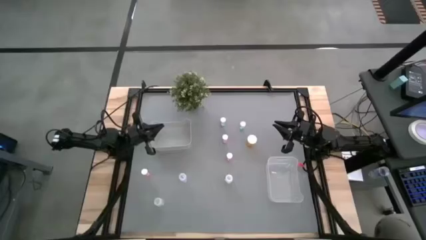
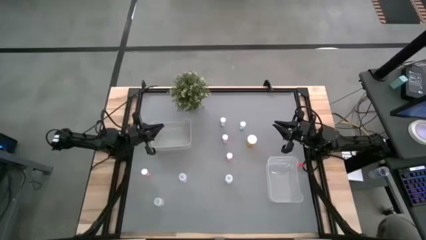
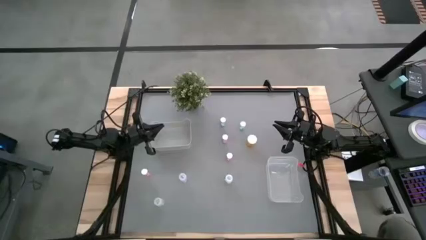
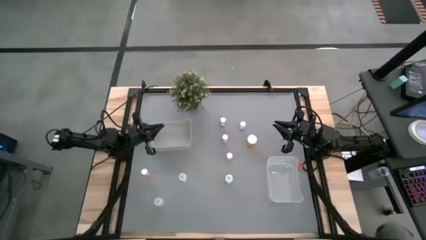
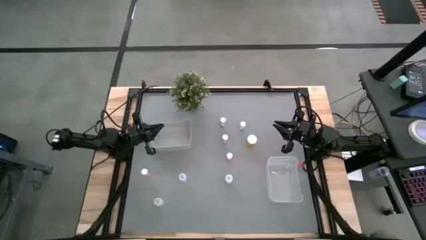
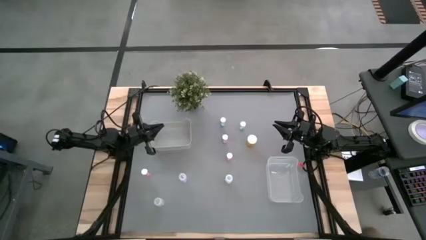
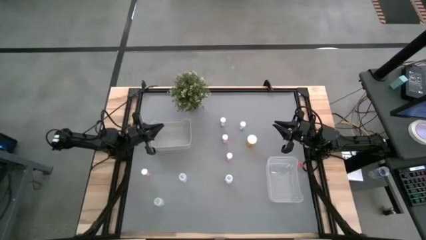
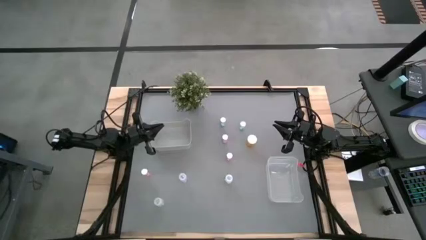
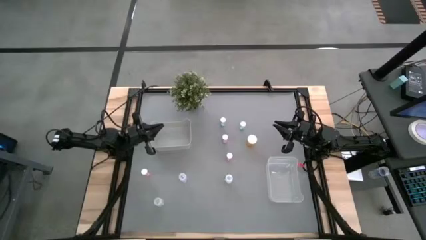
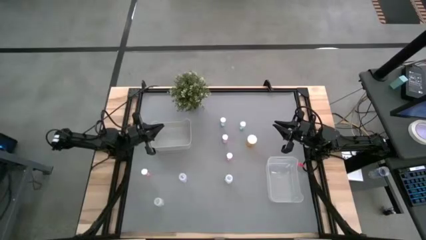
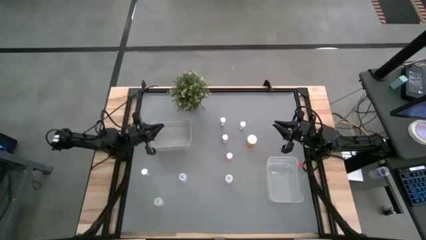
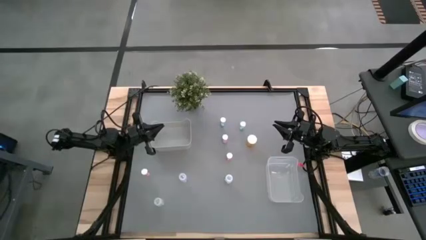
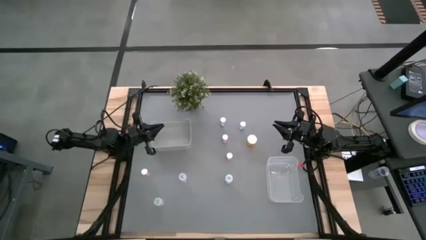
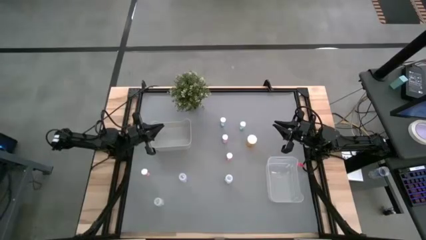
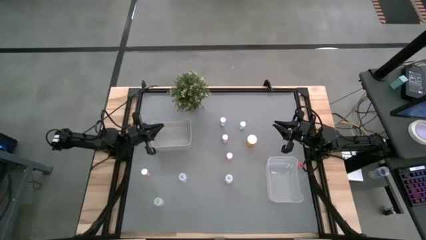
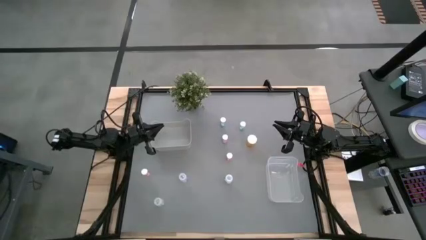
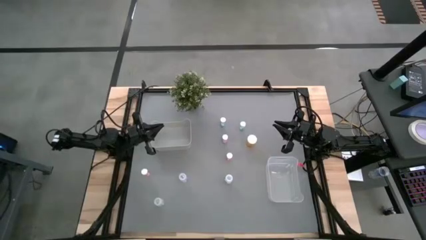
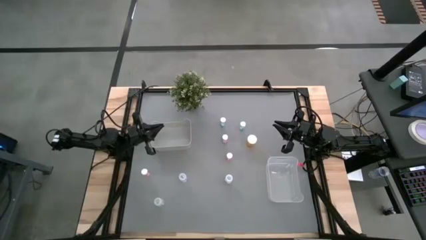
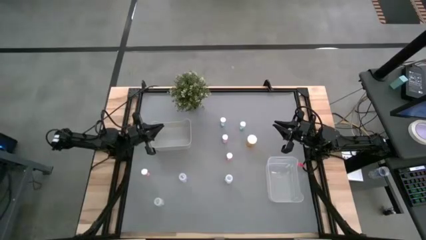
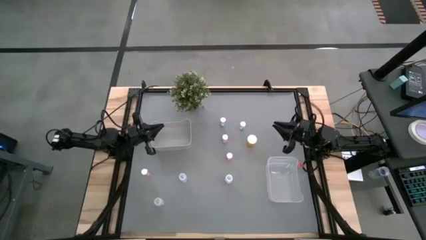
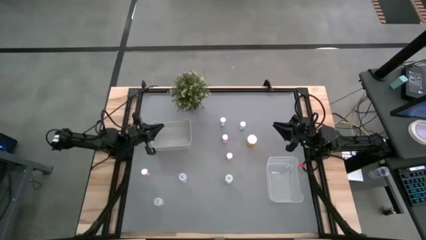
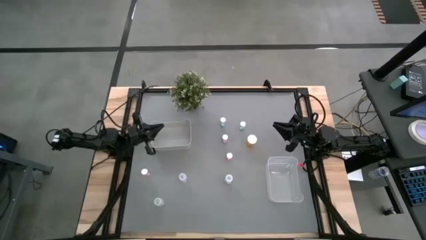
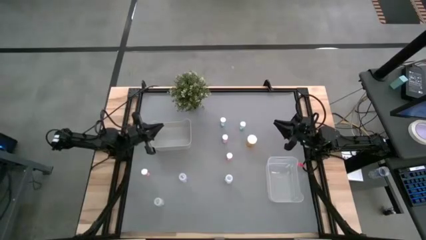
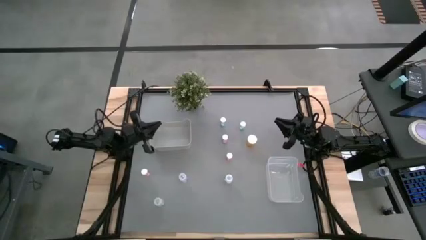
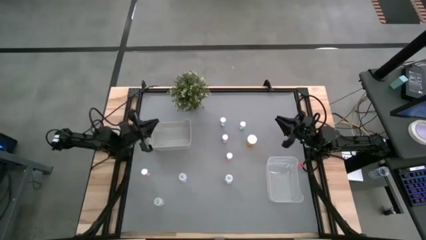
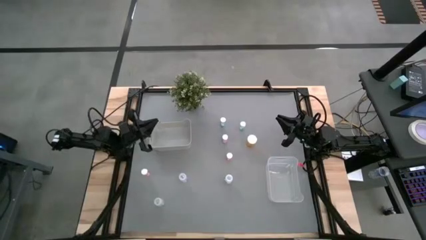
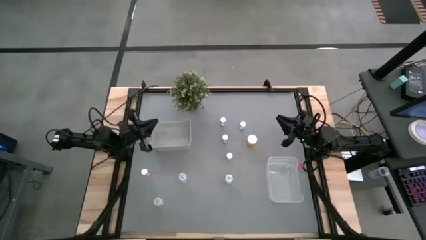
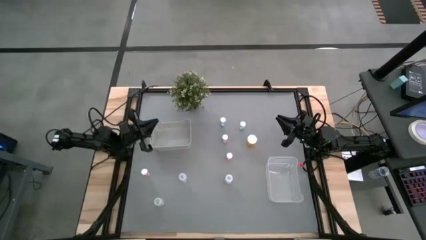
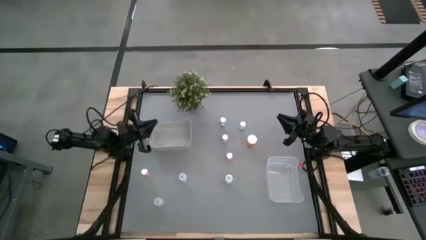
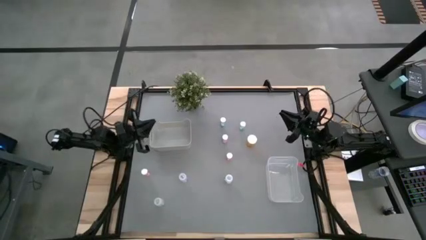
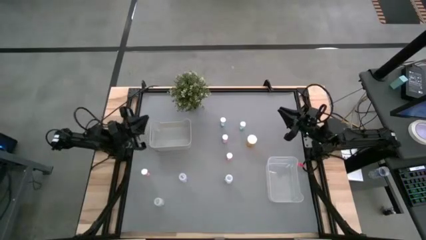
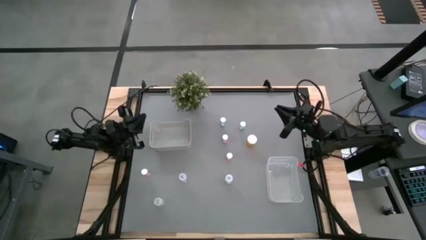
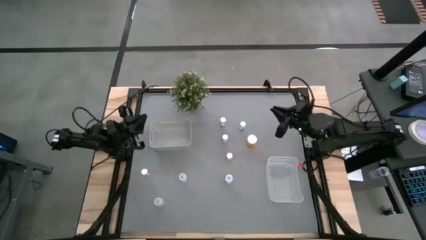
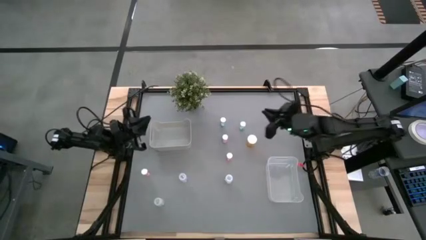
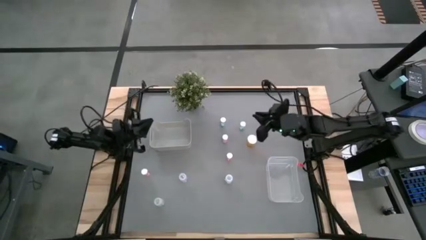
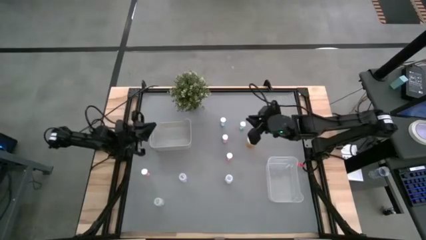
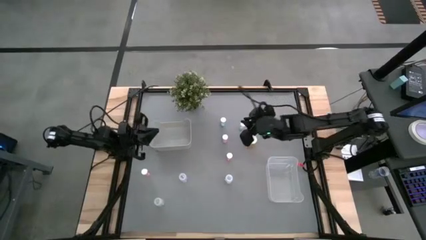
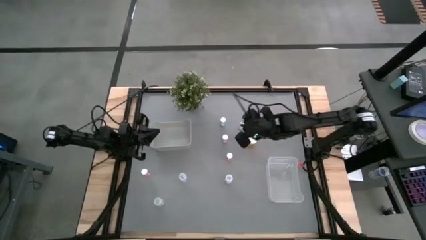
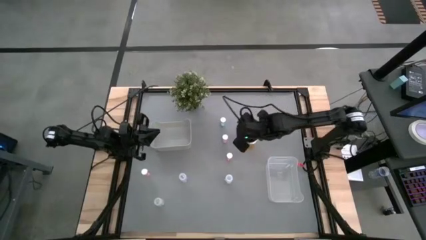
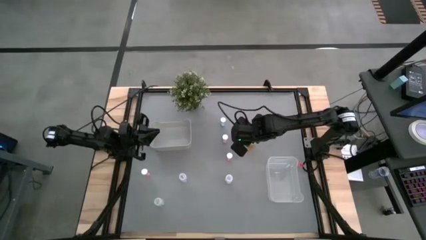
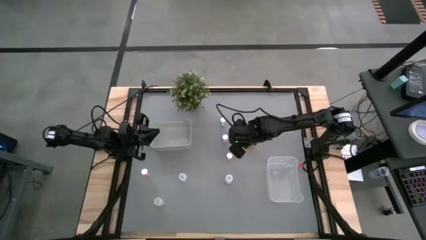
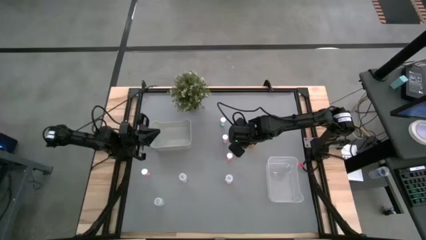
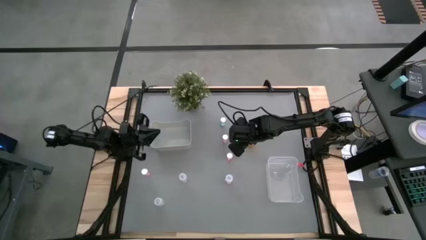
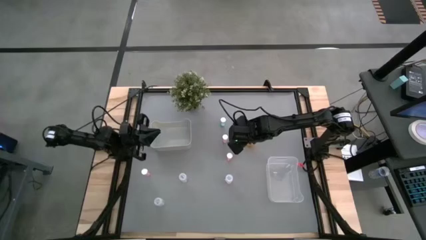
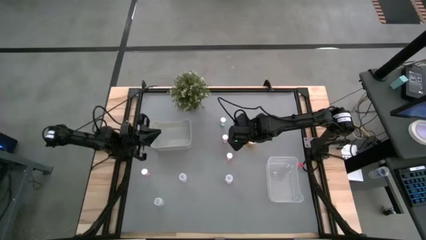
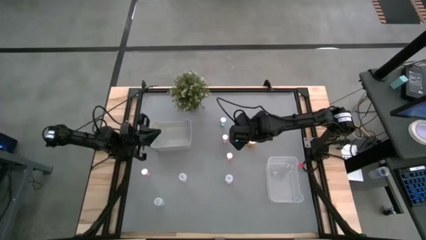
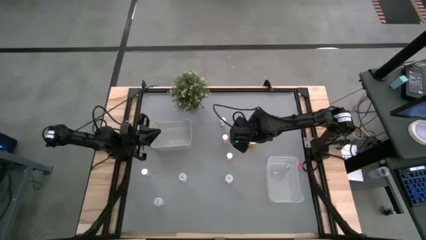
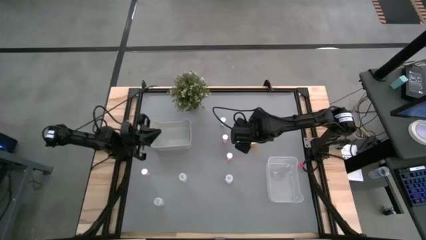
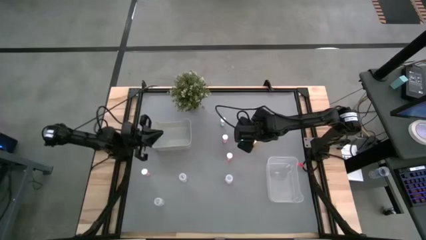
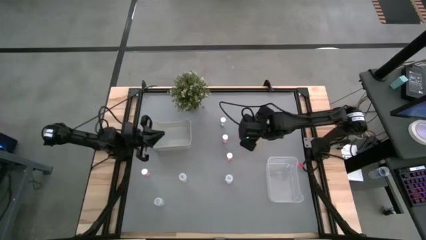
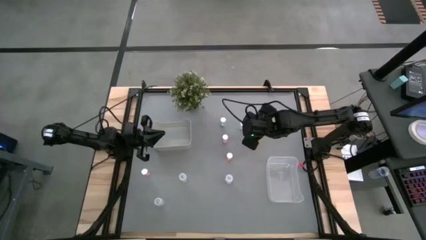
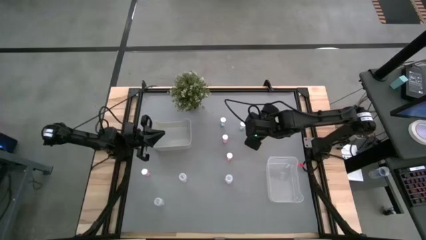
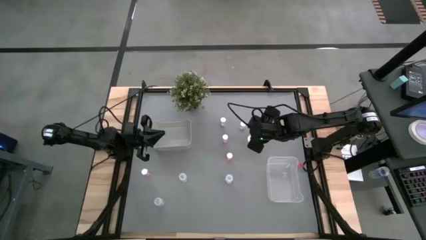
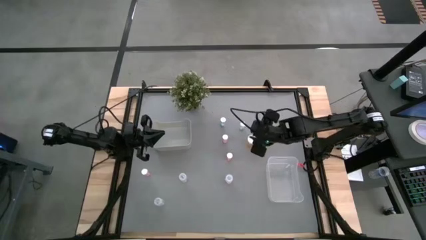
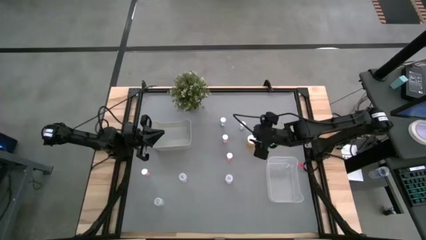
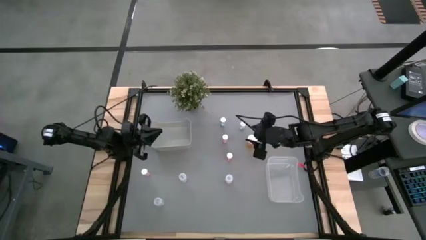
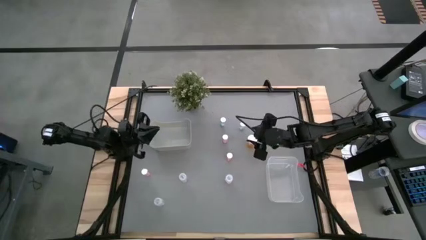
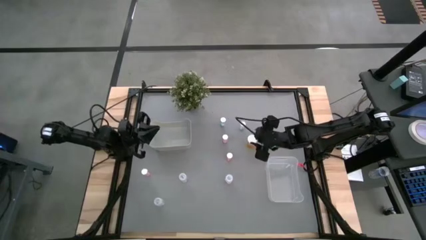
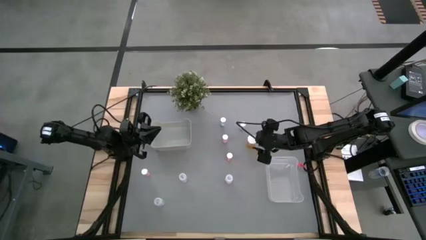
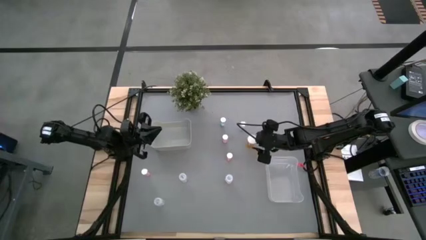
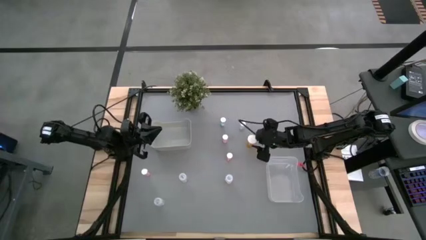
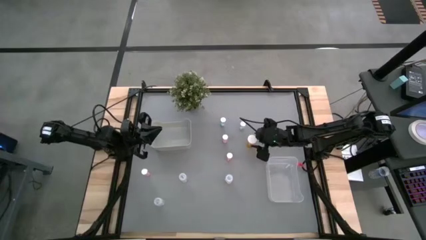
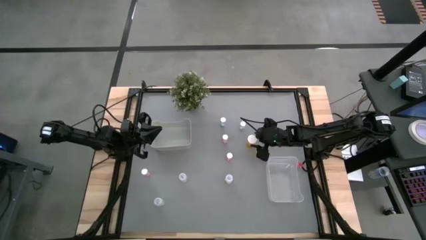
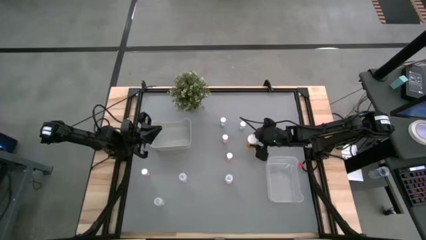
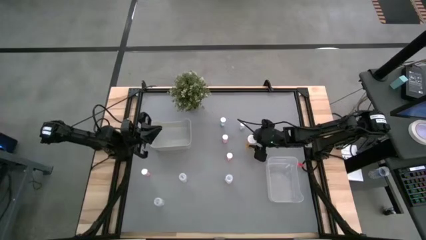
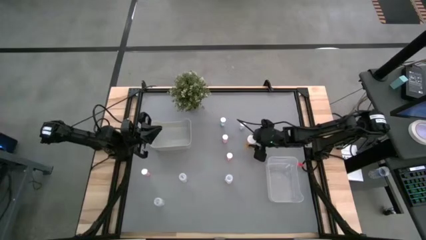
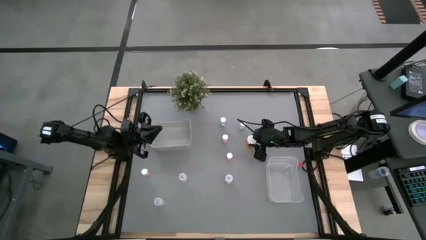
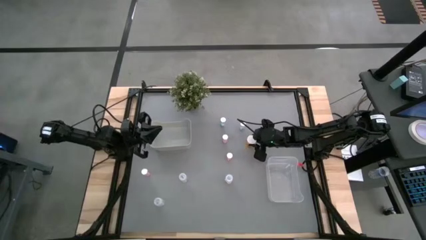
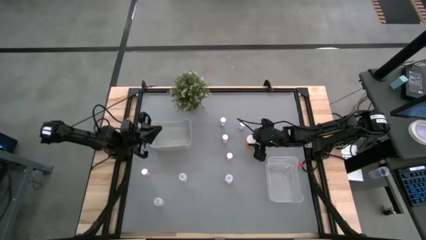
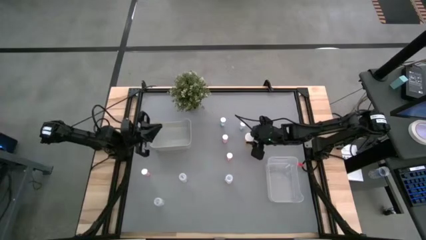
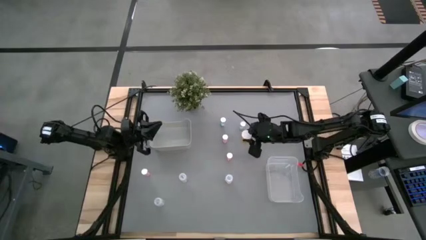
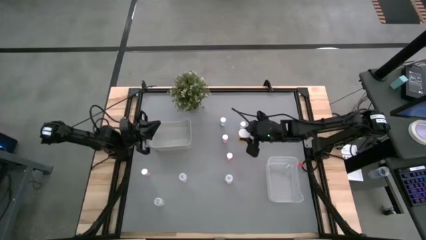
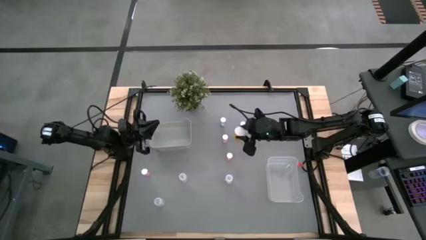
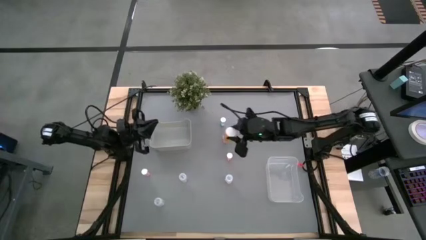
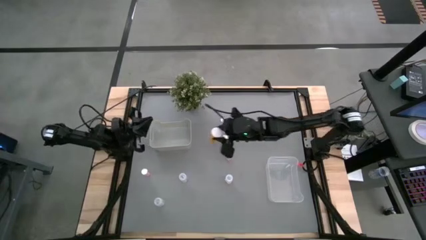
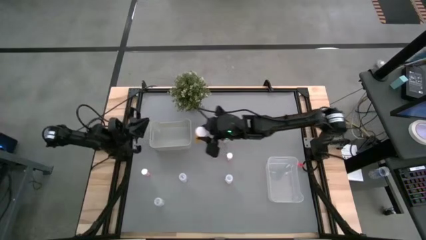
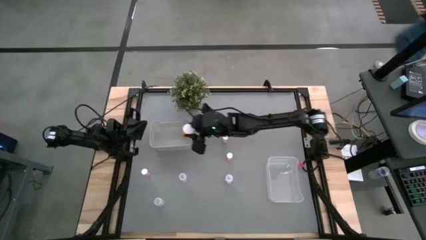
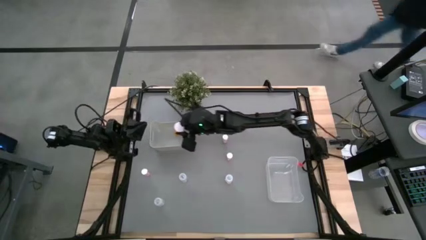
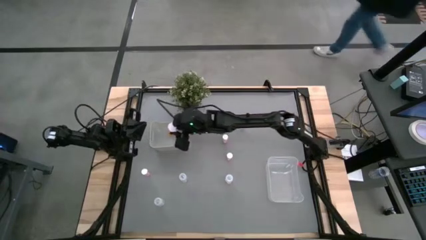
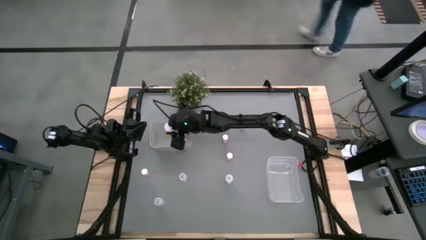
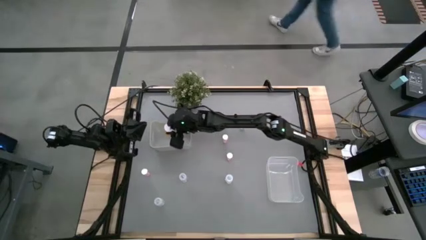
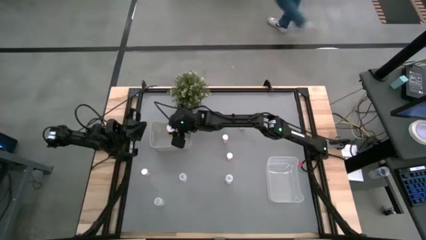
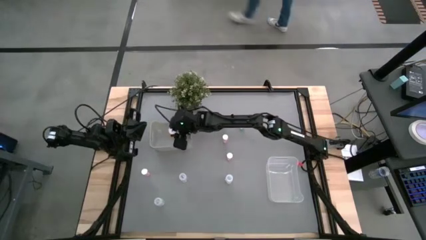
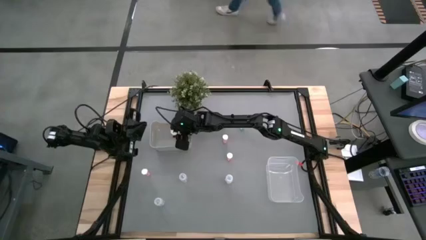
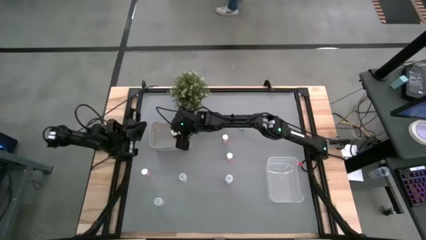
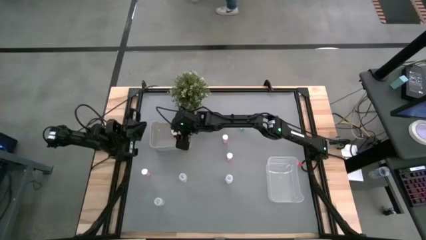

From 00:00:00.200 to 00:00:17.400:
Task: Pick and place medicine bottles into bin by pill shape (circle, oval)
Put the orange pill bottle into the gray bin
